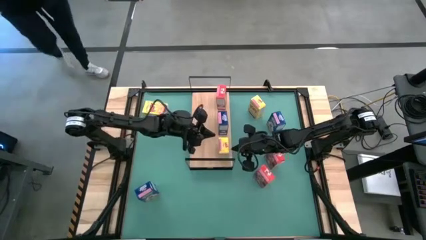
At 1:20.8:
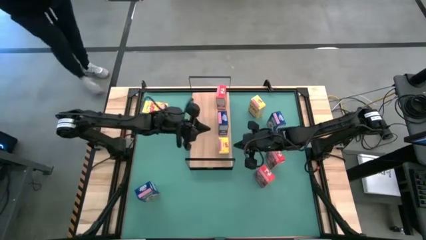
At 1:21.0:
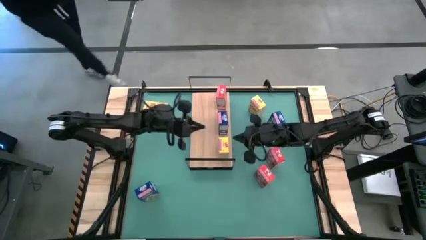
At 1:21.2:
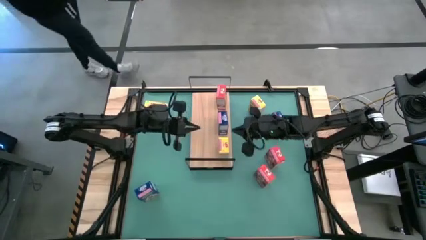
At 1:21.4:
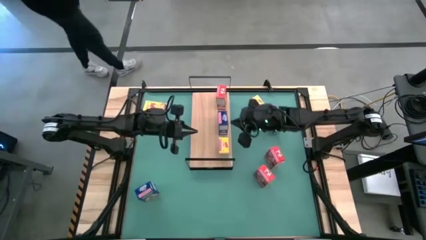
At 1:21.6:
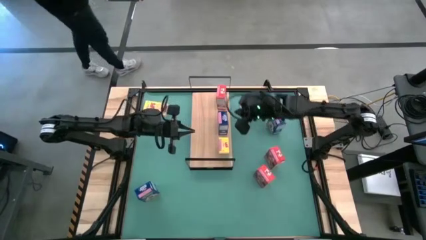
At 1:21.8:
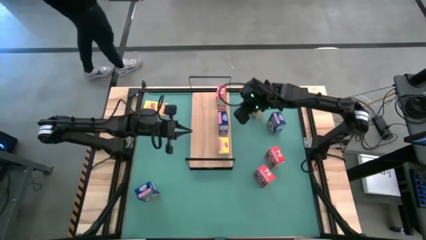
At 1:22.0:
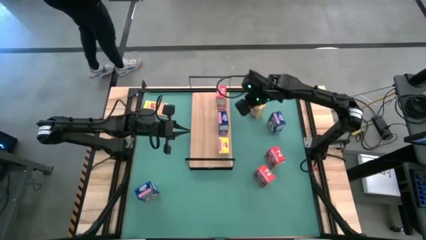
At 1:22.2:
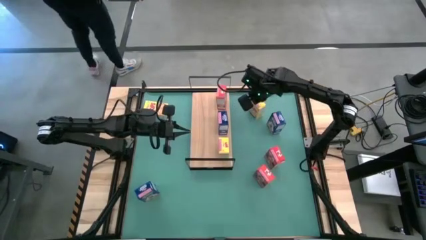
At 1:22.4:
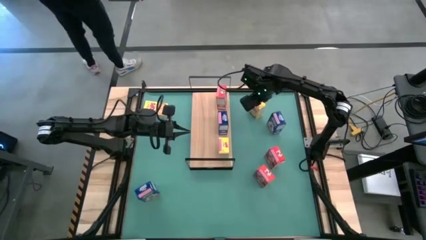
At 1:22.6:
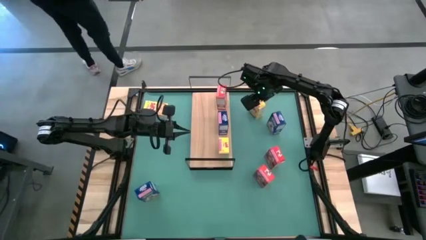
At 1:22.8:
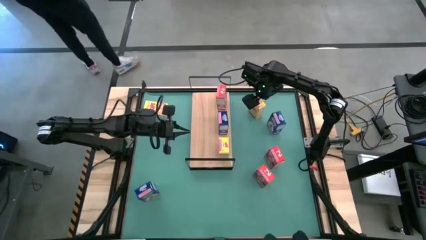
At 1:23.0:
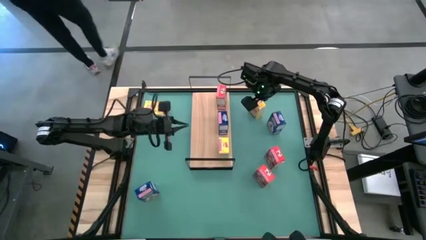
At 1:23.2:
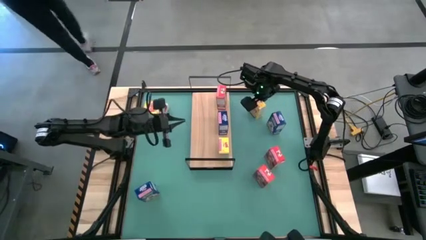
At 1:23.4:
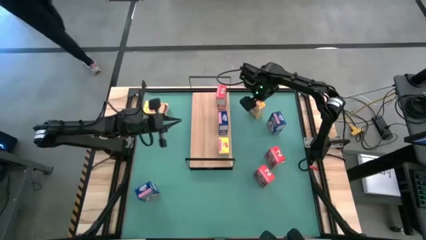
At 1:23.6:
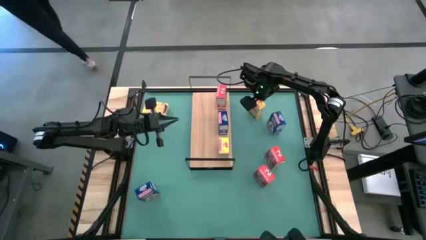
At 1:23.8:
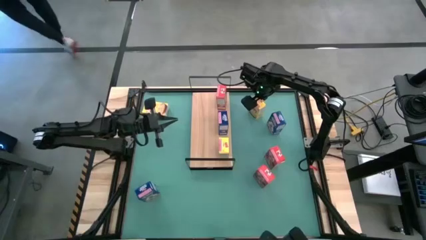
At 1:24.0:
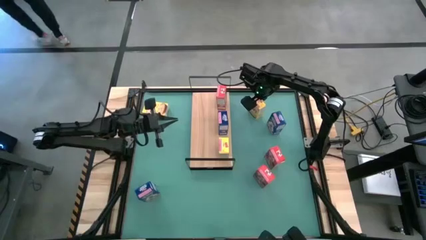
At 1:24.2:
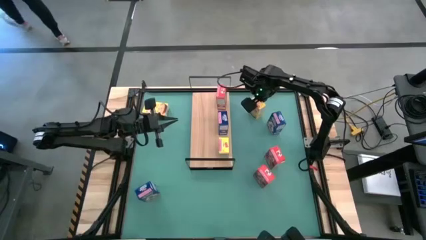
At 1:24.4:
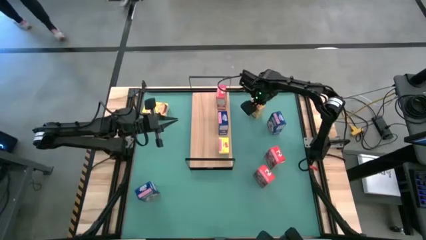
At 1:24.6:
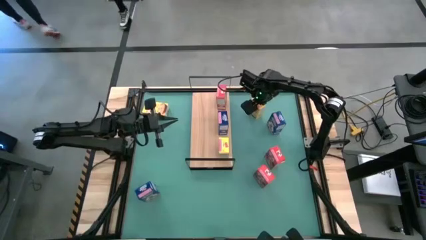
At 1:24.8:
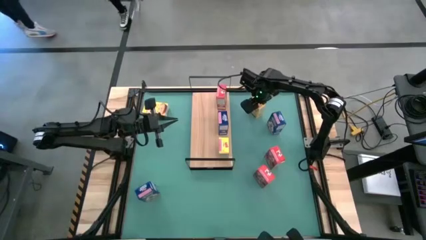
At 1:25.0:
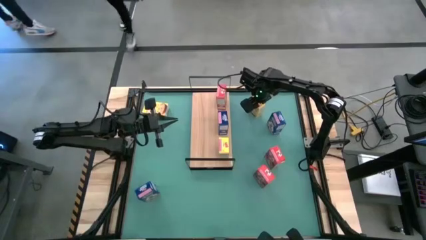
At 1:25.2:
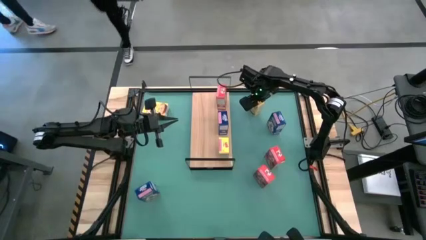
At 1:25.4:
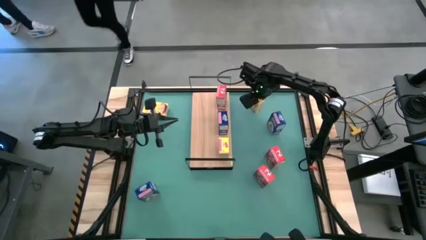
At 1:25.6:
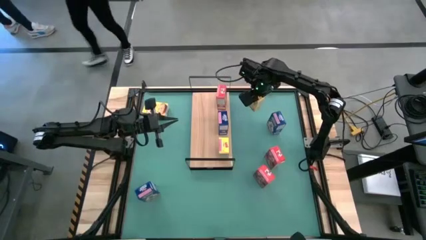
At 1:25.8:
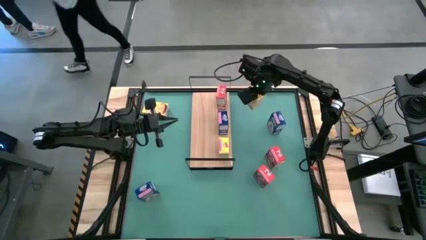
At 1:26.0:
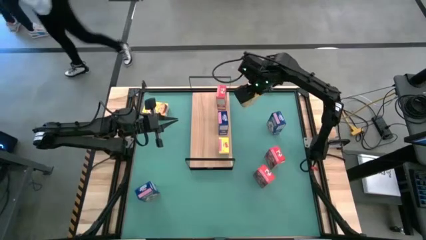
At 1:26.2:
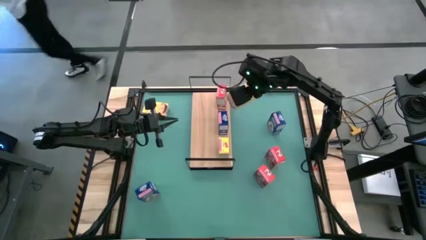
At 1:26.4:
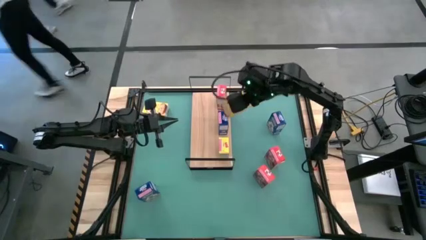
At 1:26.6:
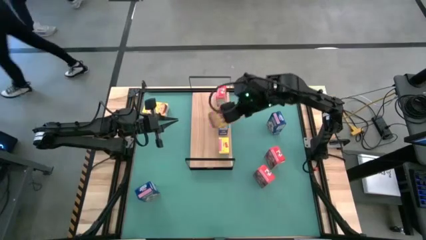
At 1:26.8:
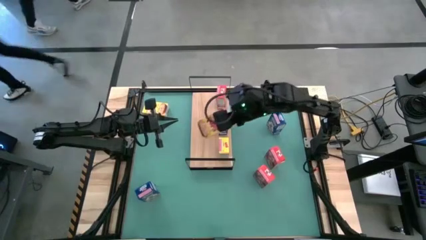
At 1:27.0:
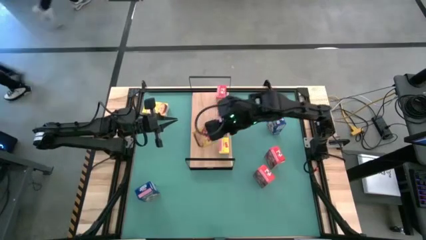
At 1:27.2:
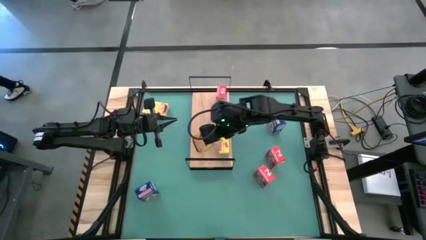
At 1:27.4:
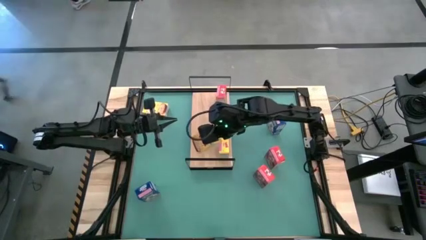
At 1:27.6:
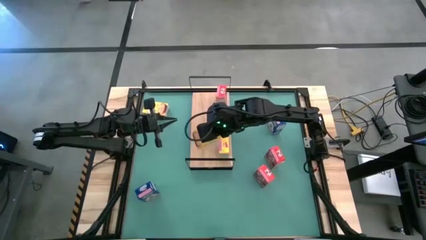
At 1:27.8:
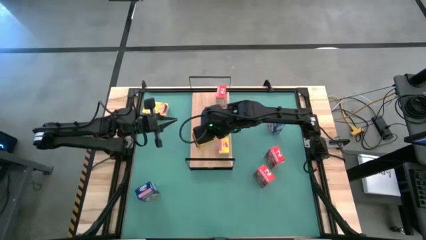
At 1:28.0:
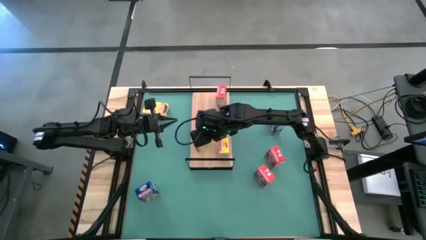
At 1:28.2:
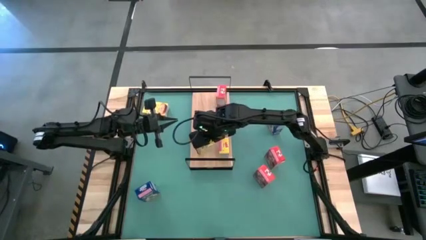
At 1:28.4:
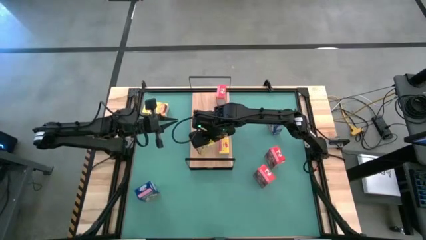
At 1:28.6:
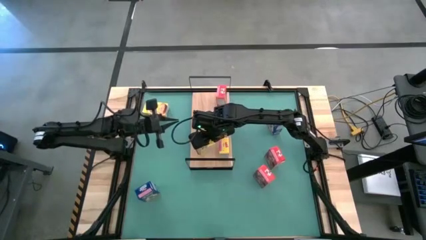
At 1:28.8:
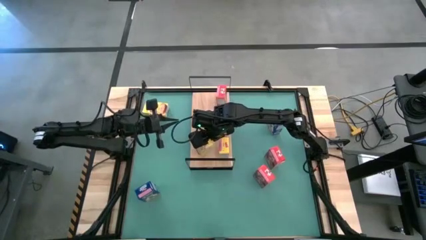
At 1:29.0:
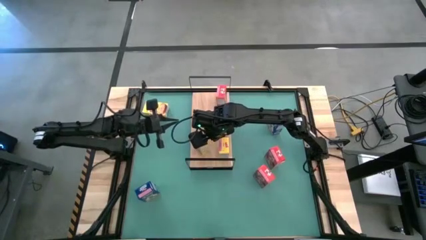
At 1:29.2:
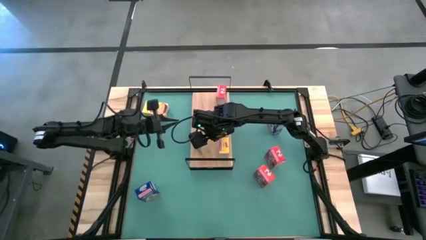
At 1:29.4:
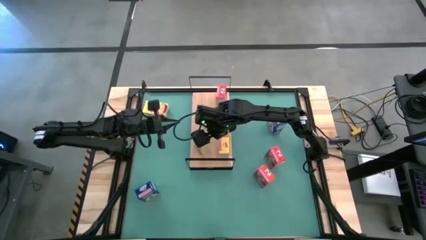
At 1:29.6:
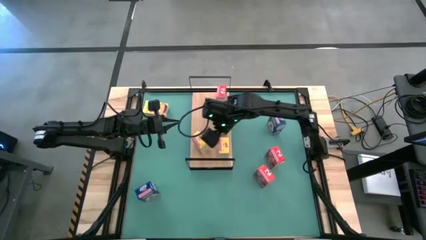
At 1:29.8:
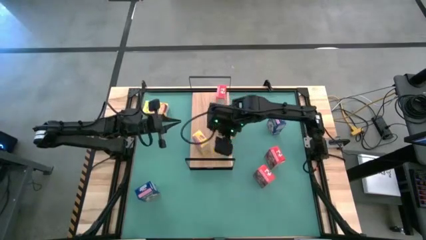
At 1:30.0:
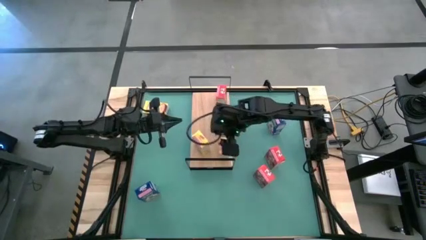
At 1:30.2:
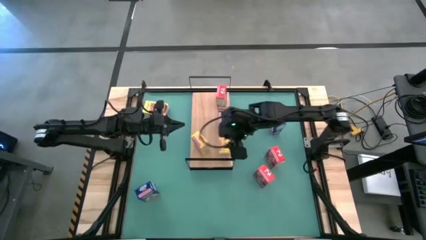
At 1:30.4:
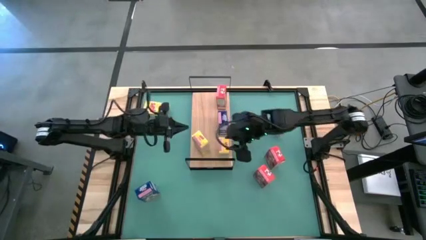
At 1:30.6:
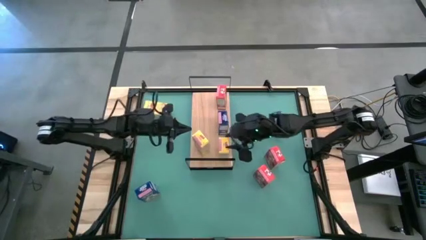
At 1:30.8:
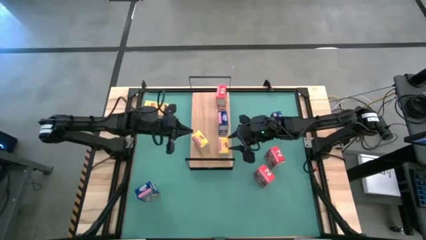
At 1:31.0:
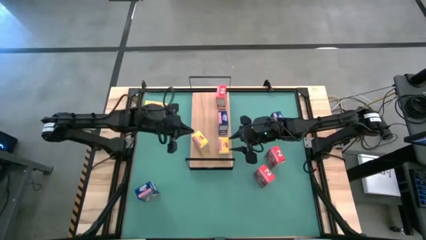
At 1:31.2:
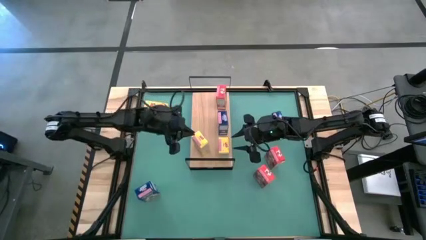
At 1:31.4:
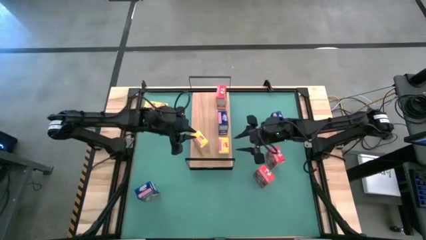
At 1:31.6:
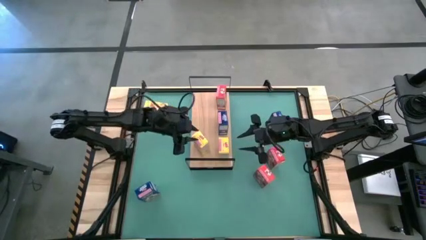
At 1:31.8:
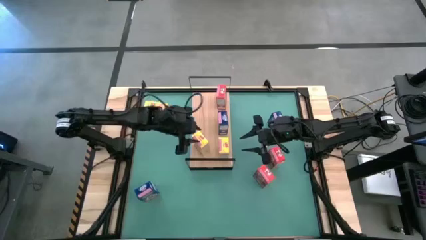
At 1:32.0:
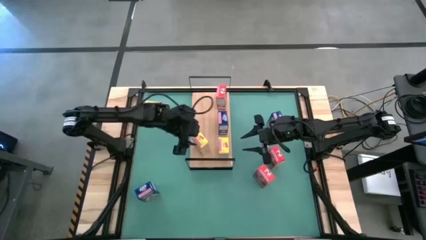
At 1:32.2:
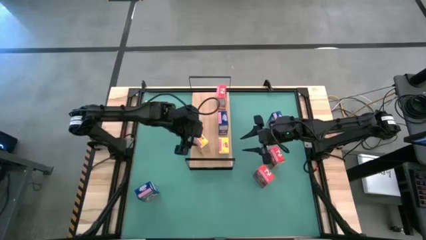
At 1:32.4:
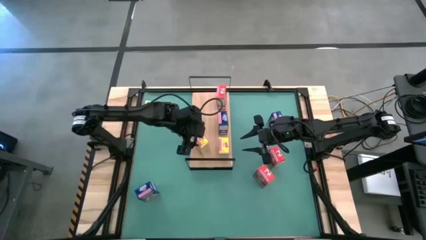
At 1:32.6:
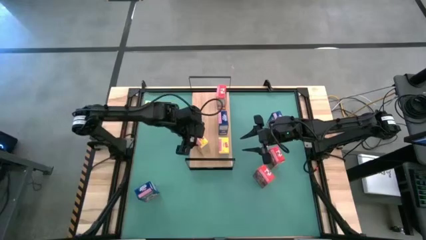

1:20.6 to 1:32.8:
Task: Stack cereal on shelf
Put the right yellow cereal box on the shelf aligned with the other yellow cereal box

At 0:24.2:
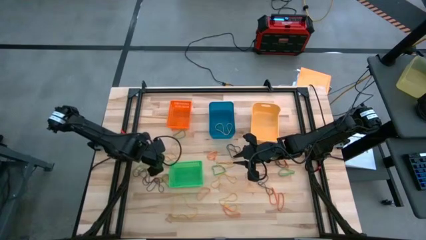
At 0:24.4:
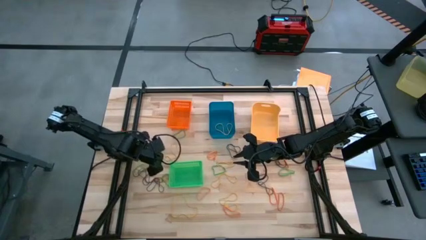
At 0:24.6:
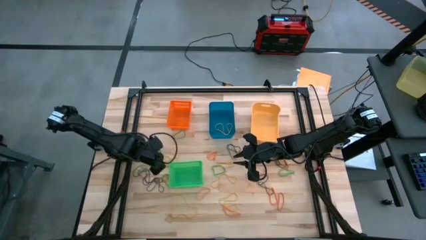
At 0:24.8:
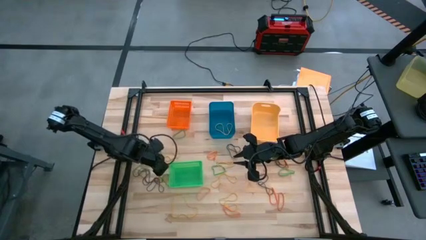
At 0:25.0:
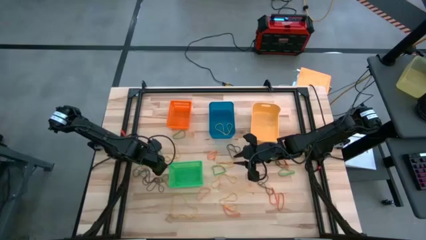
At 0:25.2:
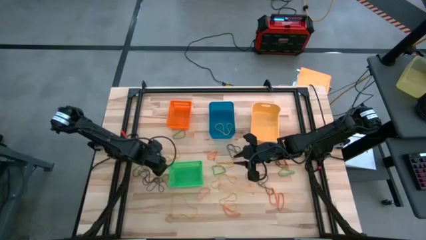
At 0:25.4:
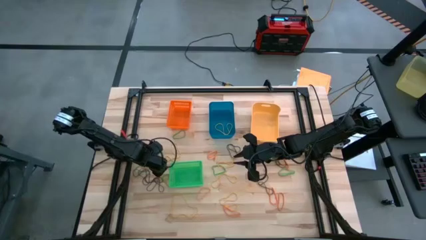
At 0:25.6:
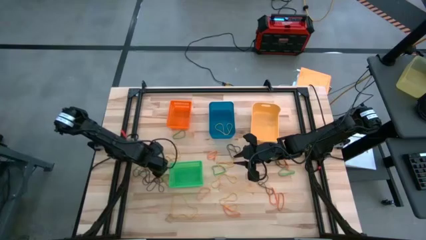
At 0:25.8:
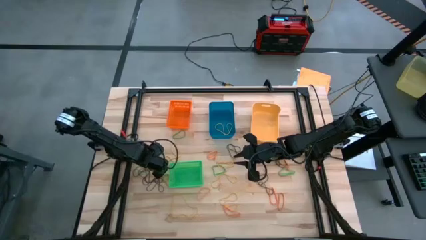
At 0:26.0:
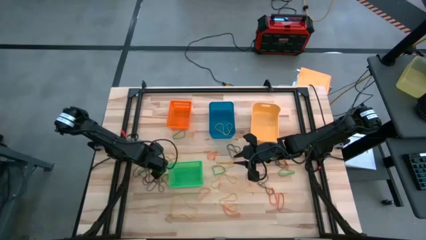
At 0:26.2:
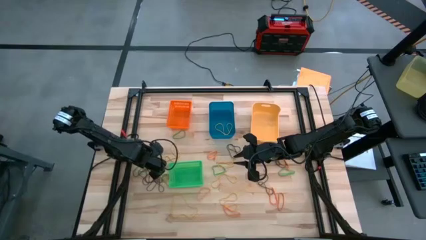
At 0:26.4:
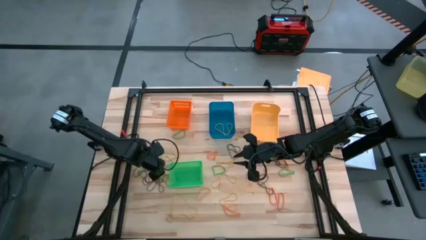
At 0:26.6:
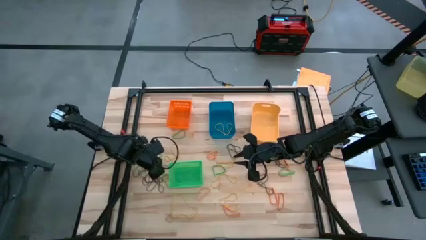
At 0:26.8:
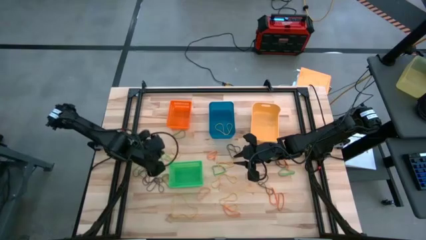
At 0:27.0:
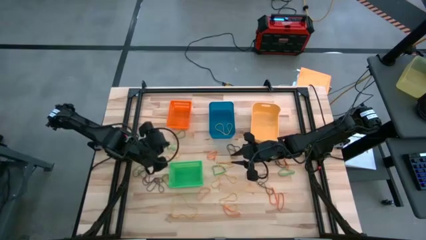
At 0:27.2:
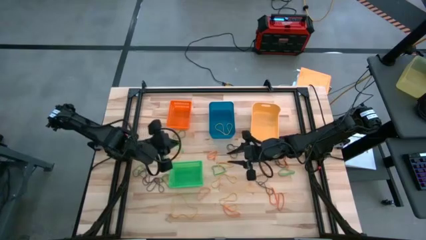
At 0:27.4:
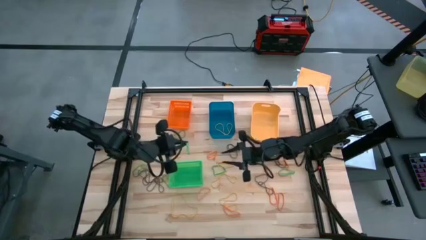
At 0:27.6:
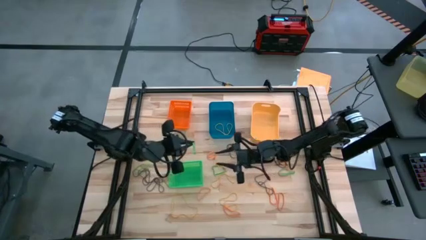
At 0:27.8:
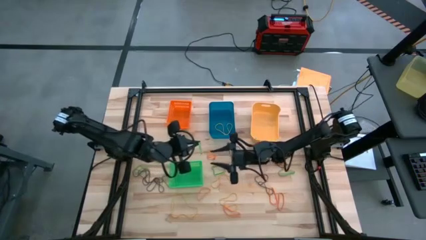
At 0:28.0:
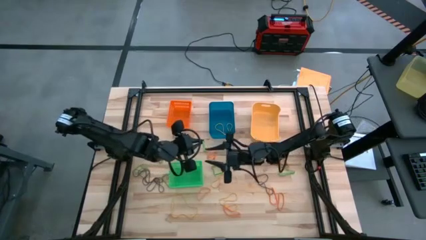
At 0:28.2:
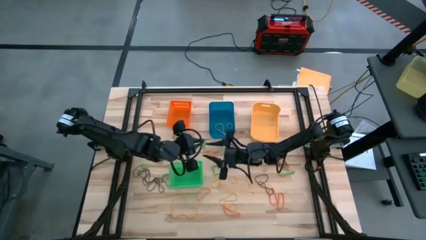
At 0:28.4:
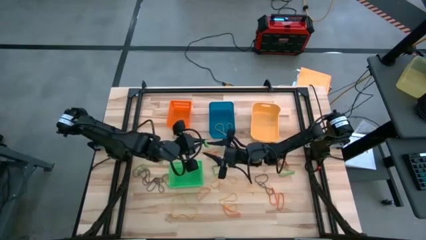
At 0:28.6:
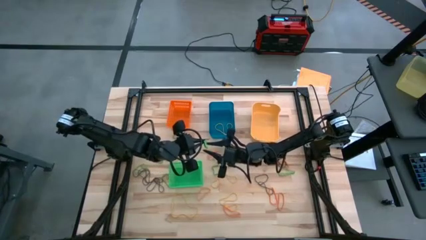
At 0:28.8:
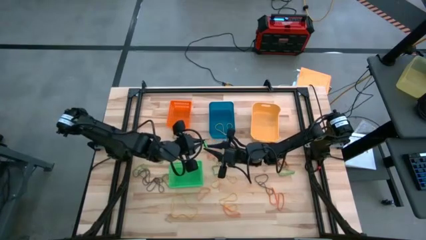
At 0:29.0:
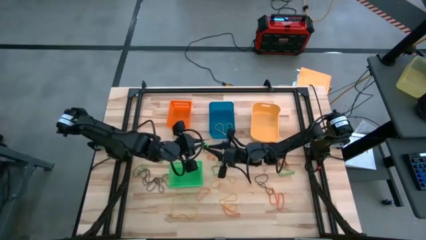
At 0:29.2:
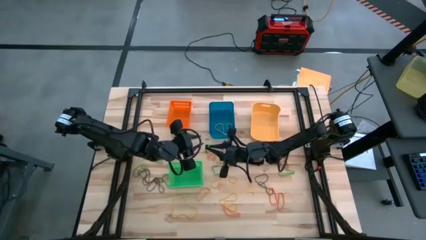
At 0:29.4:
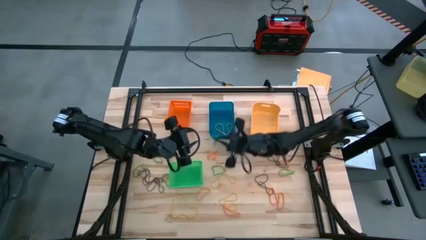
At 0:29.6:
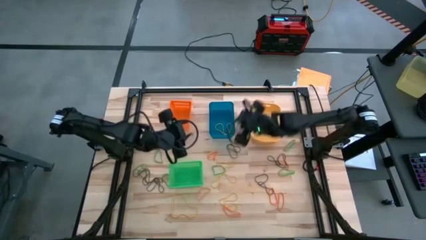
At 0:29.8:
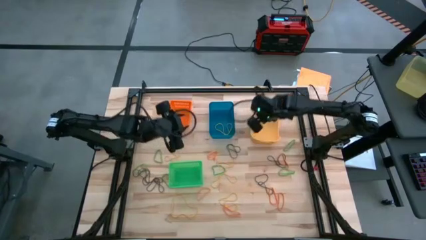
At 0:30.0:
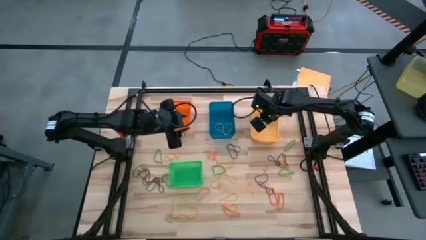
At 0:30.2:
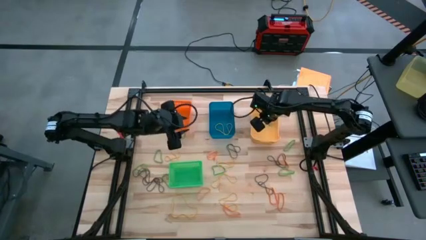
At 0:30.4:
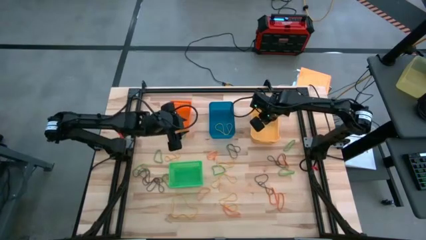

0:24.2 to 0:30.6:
Task: Sort rubber bands into baskets
Put the green rubberband into the yellow bin
